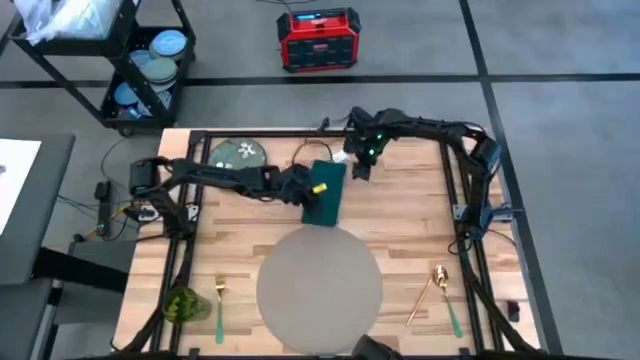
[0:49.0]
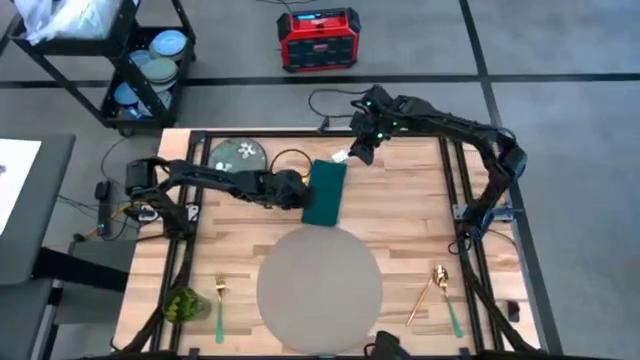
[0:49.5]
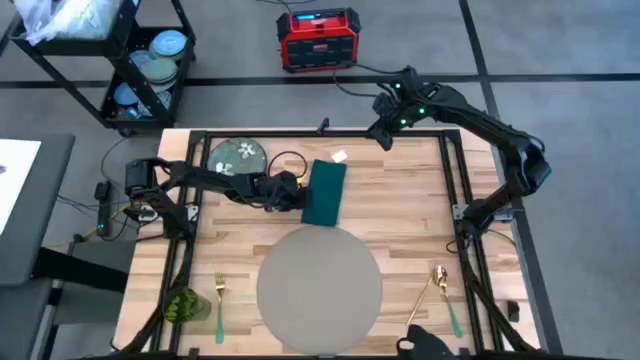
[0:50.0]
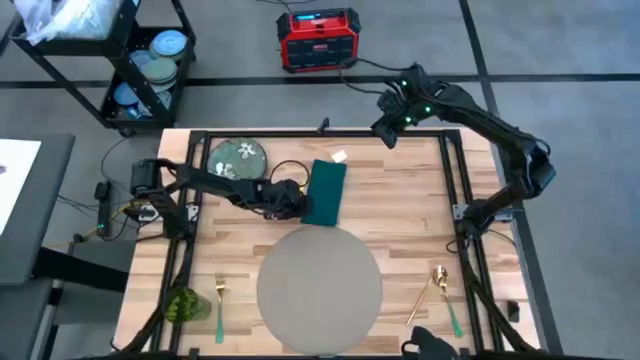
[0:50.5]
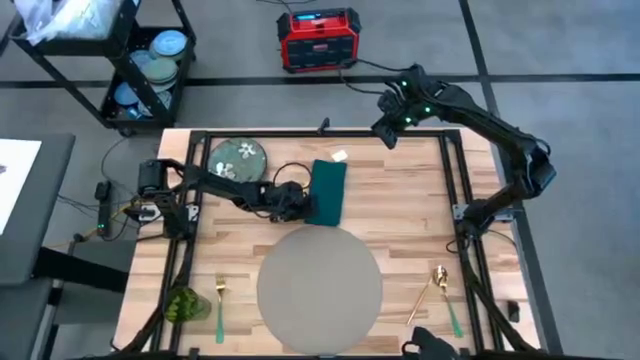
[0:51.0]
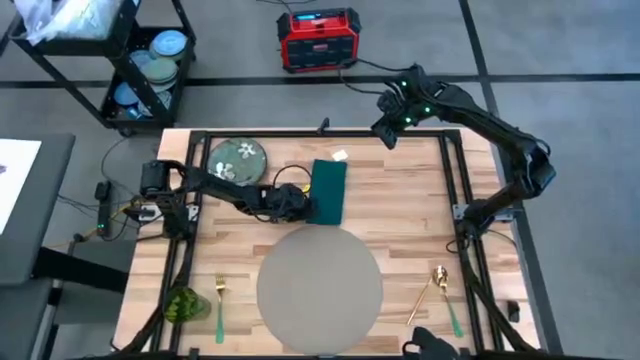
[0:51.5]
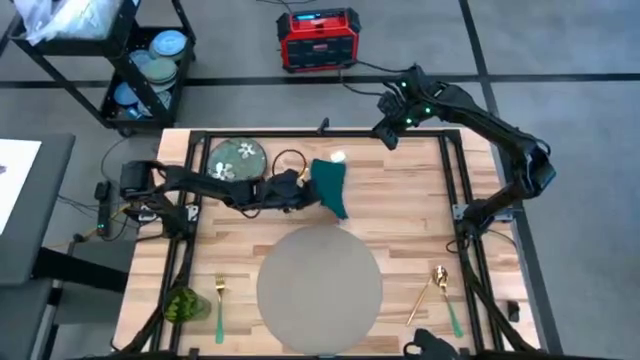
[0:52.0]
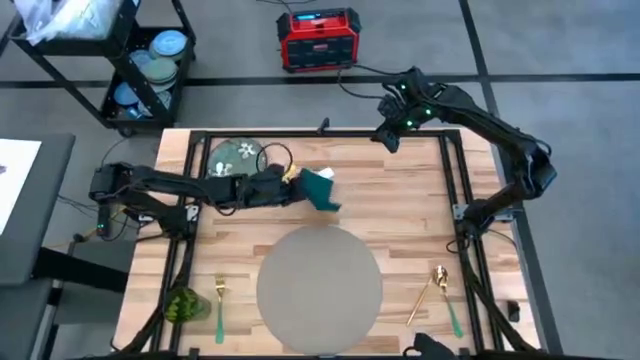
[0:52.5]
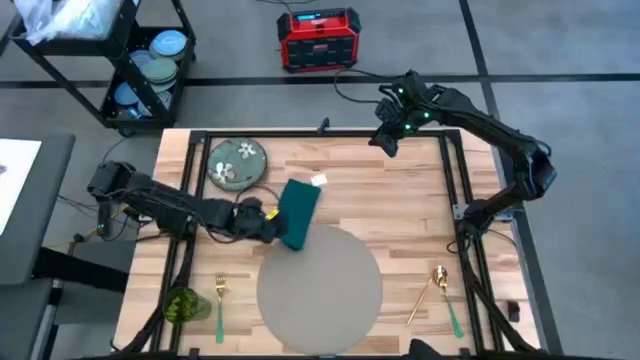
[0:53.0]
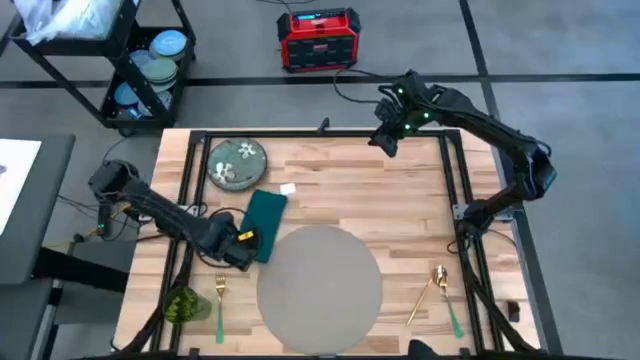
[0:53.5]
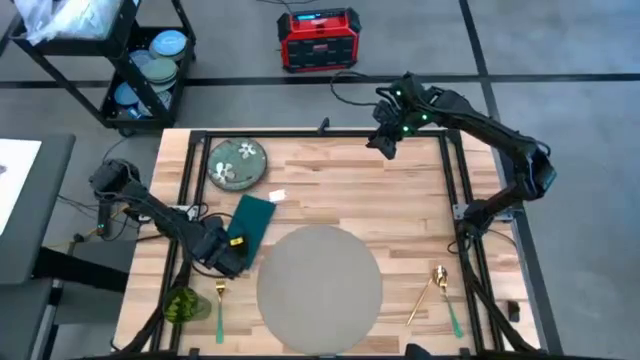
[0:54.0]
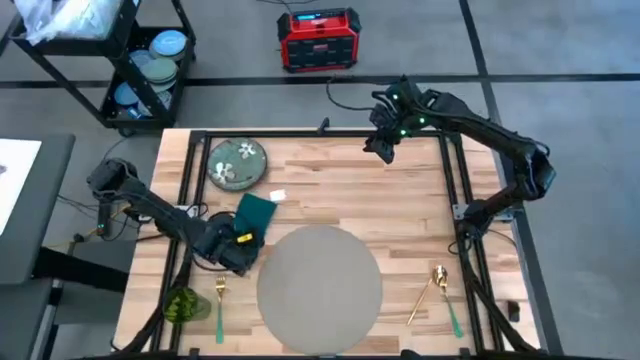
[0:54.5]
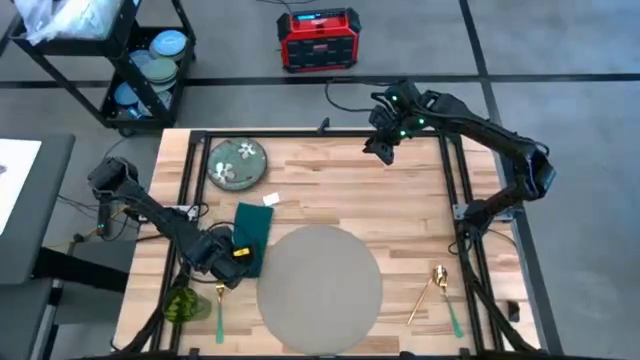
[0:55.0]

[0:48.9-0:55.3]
Task: Set table place
Move the blue table napkin to the left side of the table

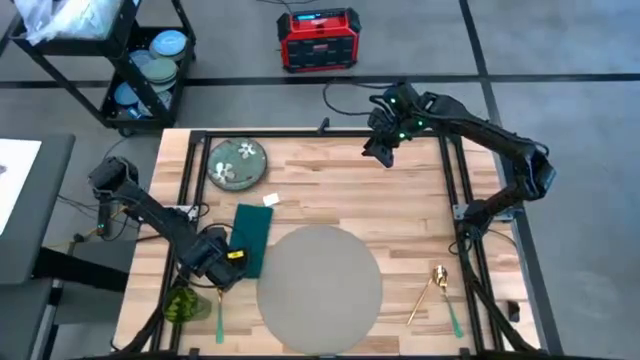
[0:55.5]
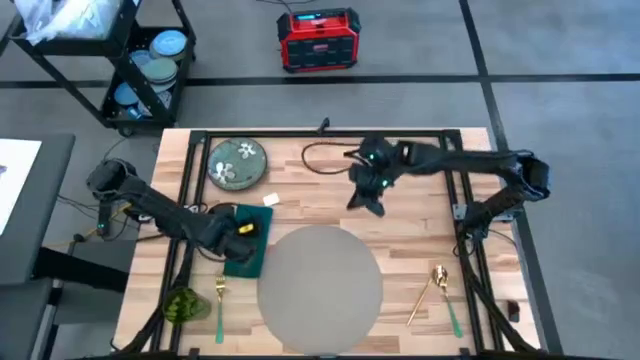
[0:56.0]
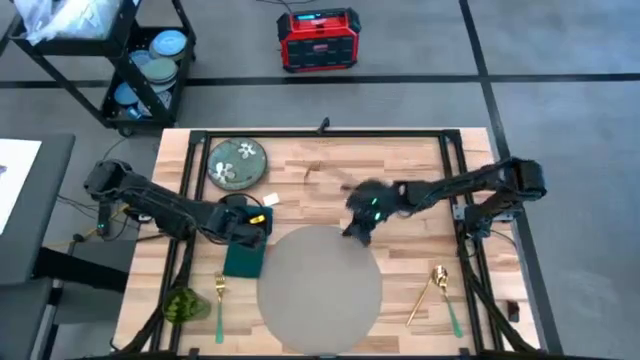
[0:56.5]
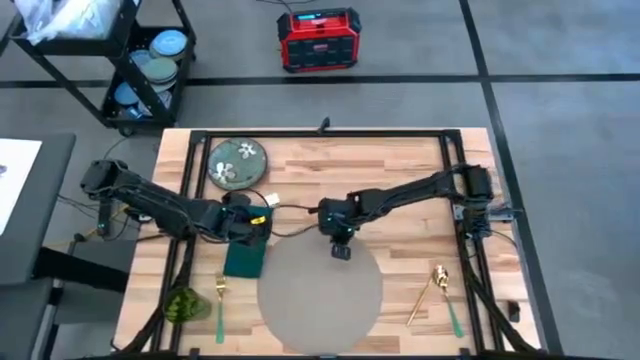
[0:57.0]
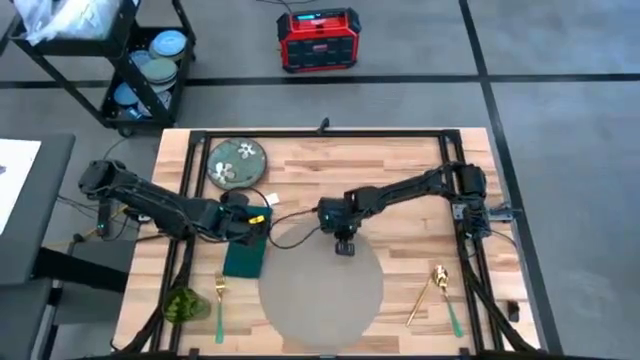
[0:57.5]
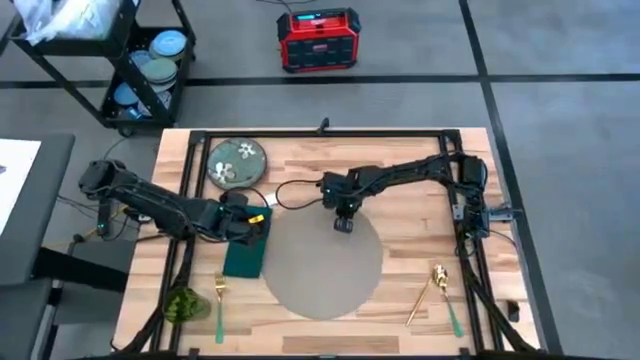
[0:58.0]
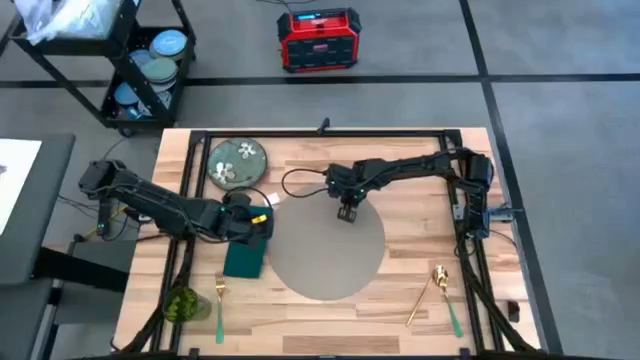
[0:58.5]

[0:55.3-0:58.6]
Adjust the gray table mat on the table

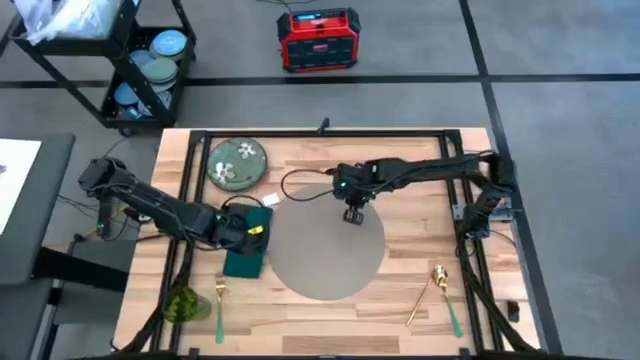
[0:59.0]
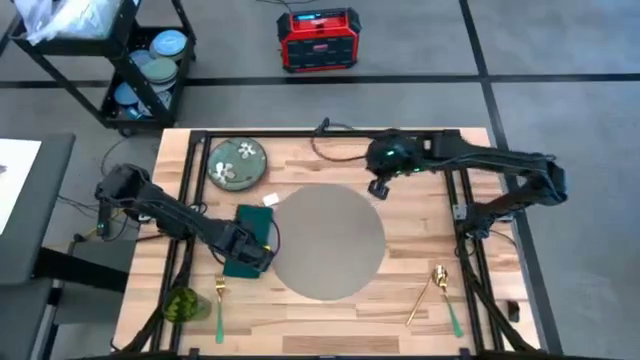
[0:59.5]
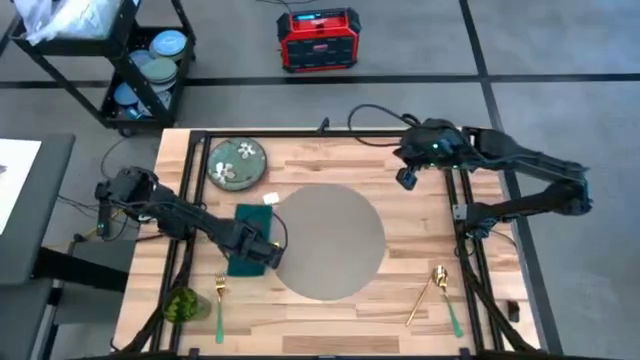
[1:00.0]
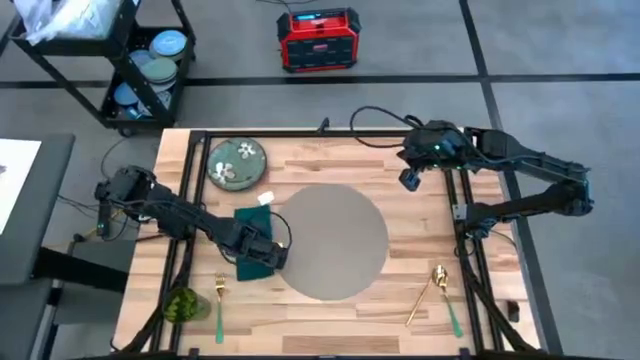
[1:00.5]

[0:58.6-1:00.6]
Adjust the blue table napkin

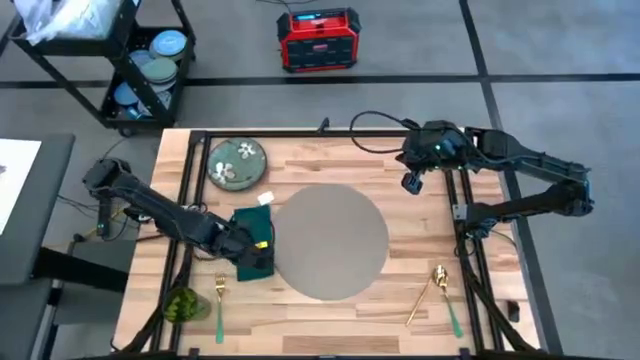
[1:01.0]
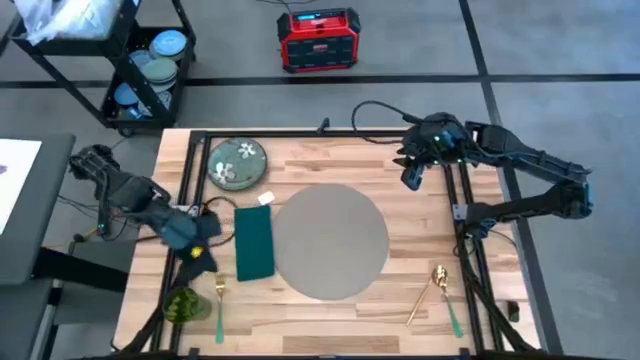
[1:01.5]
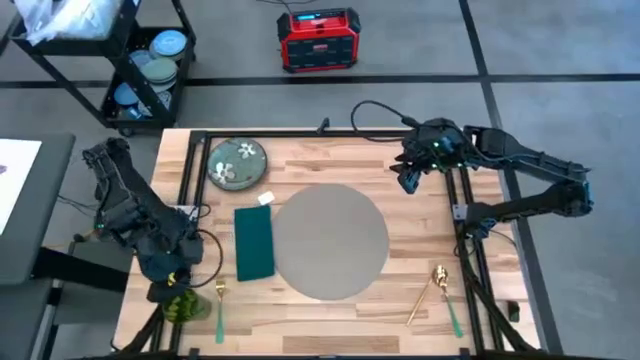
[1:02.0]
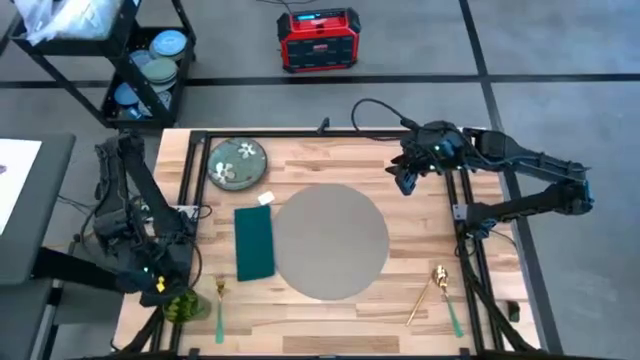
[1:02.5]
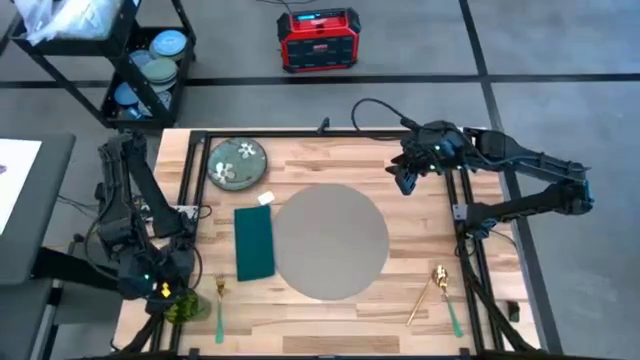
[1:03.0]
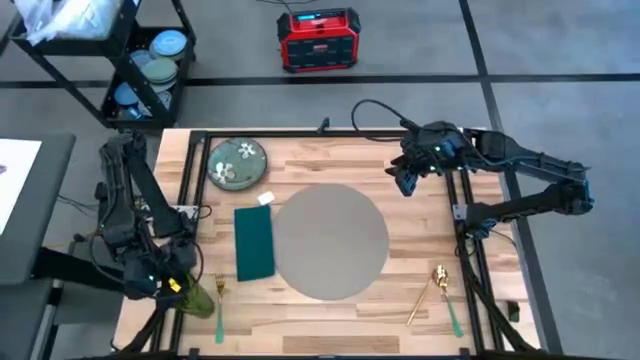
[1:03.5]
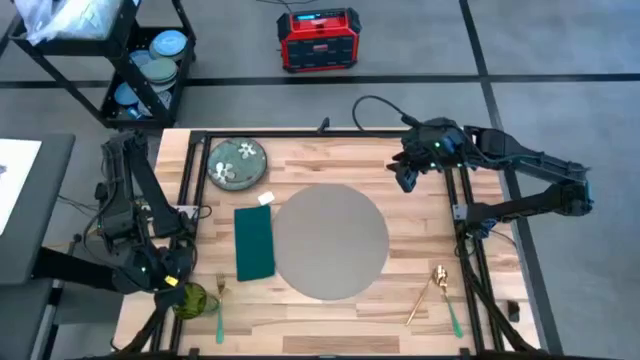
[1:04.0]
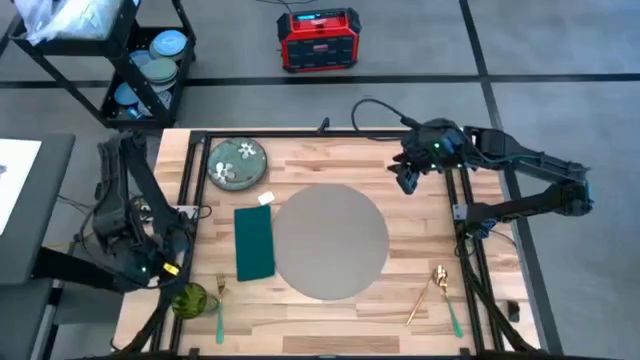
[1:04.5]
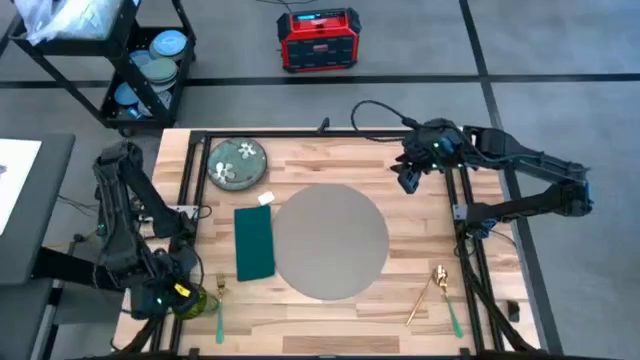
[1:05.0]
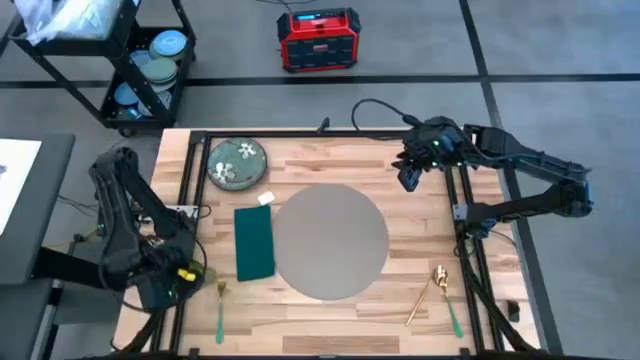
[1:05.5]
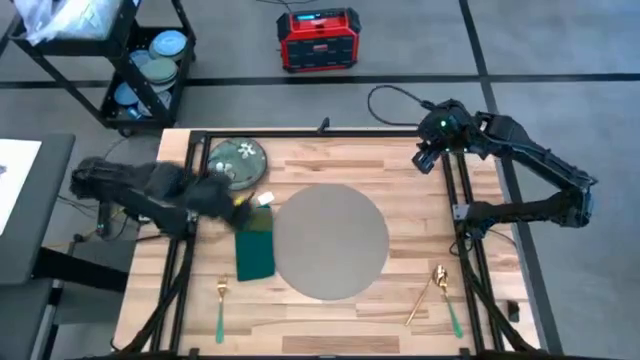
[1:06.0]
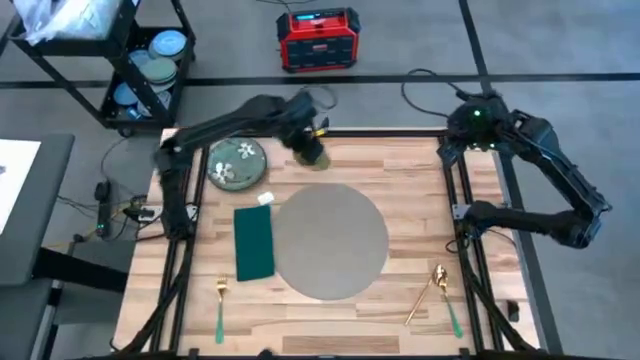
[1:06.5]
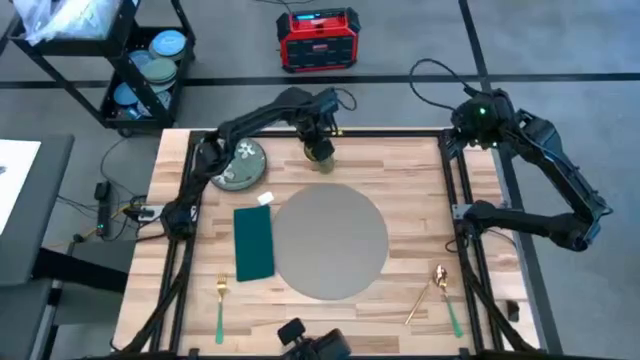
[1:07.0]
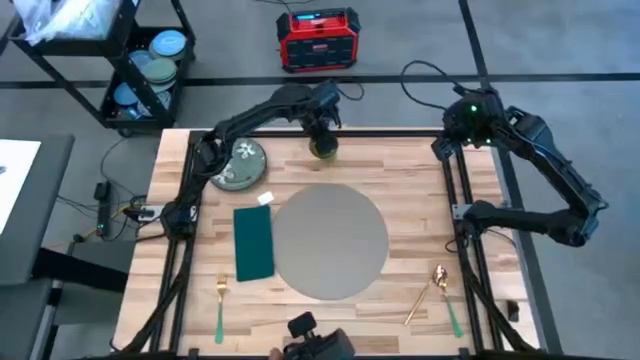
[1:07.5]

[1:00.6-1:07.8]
Move the green cup to the top of the table
